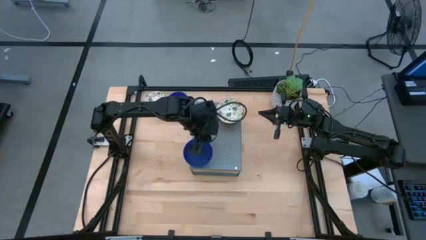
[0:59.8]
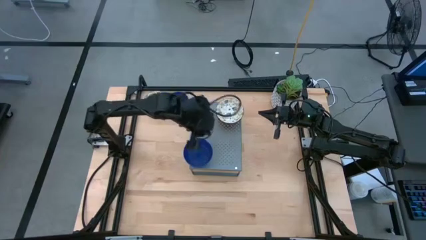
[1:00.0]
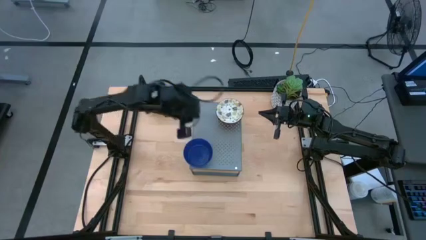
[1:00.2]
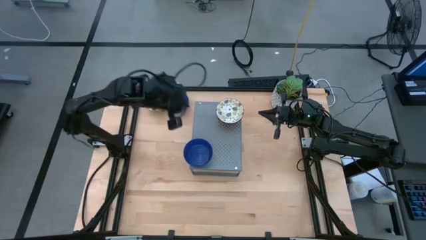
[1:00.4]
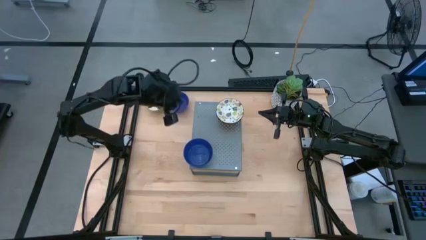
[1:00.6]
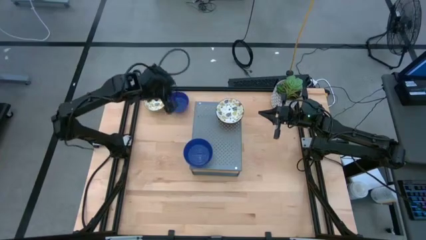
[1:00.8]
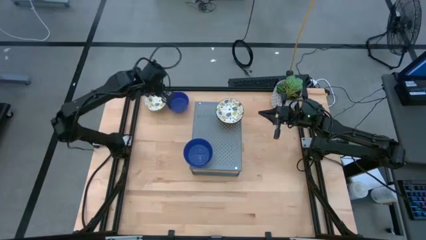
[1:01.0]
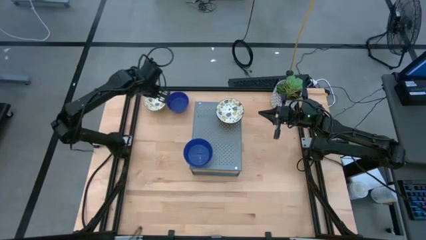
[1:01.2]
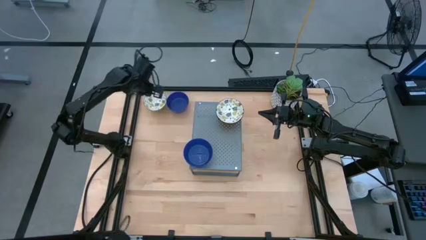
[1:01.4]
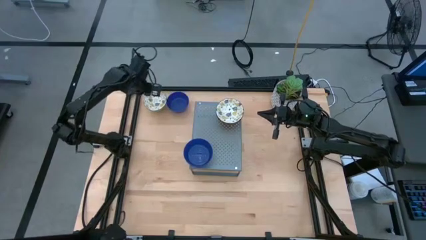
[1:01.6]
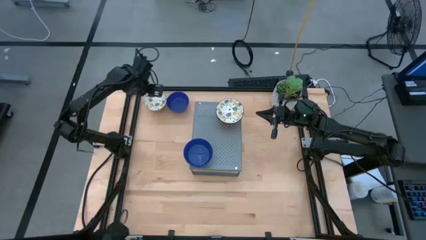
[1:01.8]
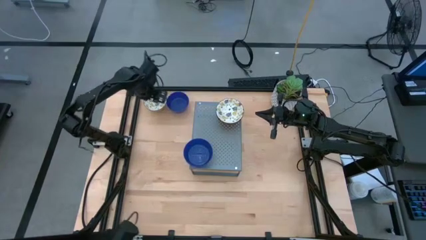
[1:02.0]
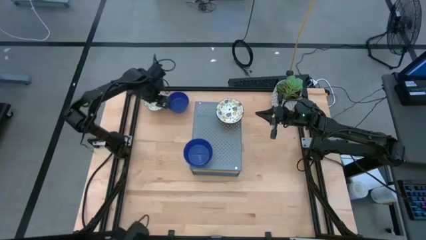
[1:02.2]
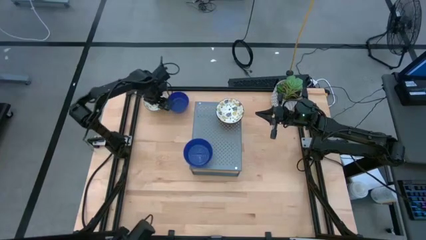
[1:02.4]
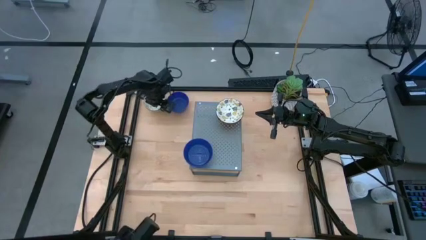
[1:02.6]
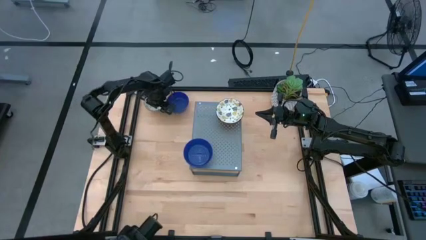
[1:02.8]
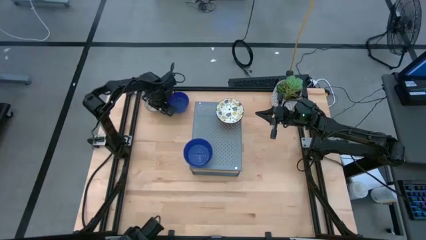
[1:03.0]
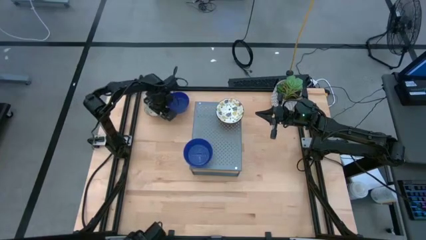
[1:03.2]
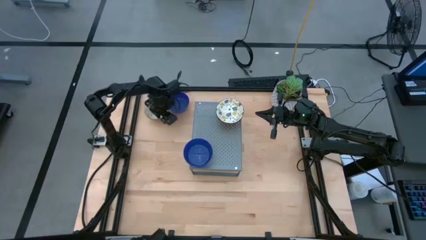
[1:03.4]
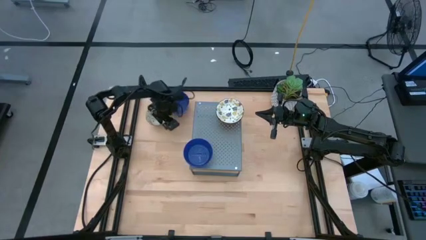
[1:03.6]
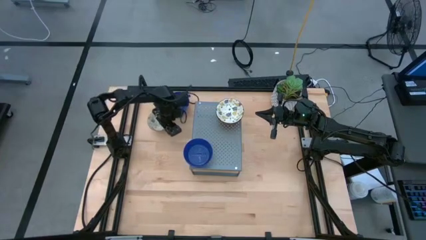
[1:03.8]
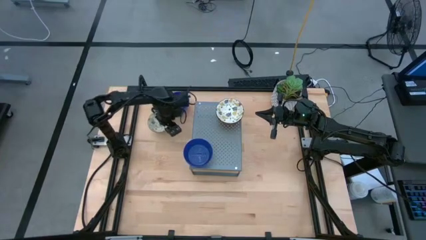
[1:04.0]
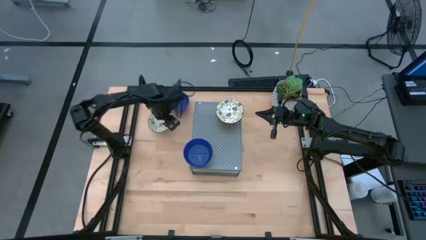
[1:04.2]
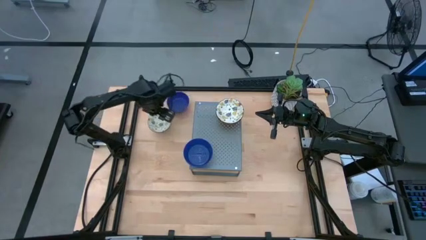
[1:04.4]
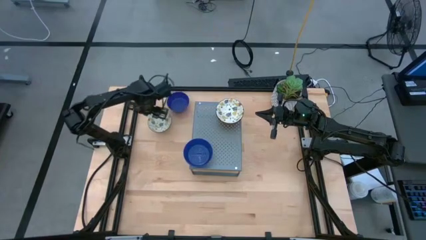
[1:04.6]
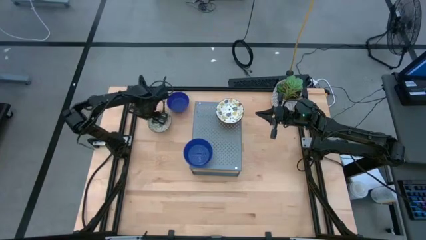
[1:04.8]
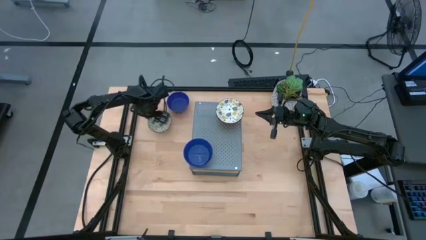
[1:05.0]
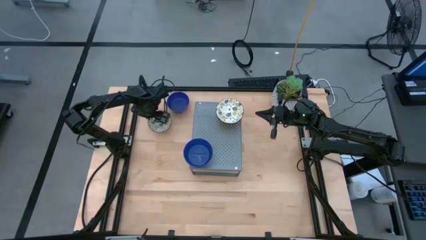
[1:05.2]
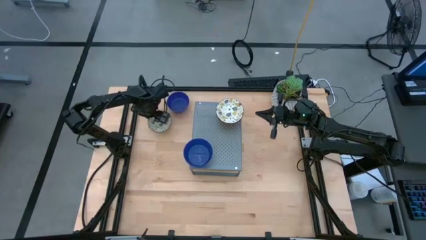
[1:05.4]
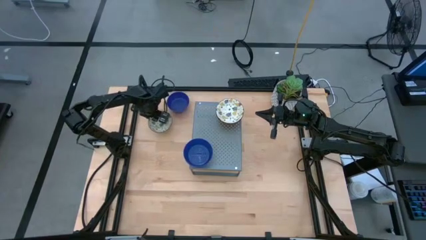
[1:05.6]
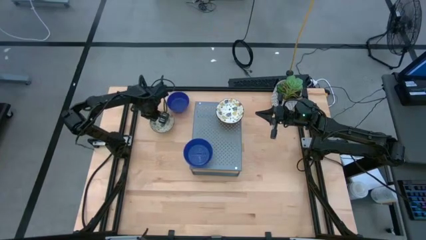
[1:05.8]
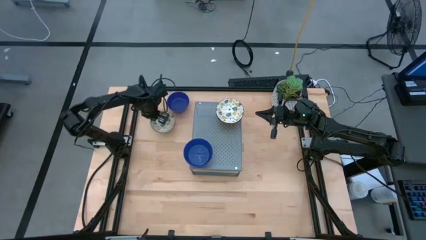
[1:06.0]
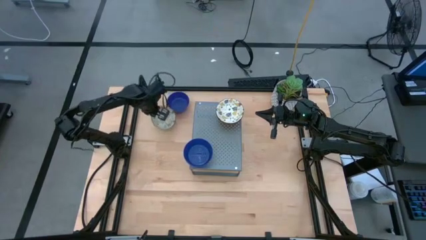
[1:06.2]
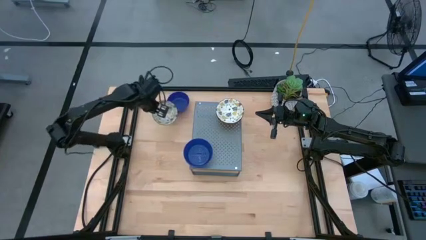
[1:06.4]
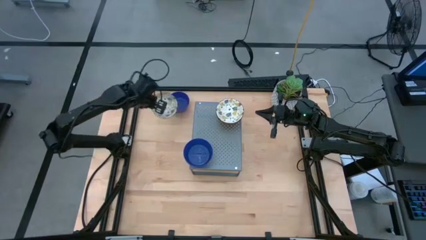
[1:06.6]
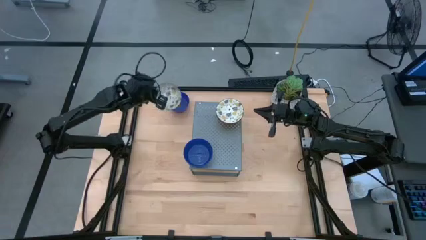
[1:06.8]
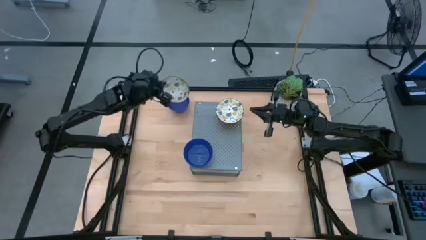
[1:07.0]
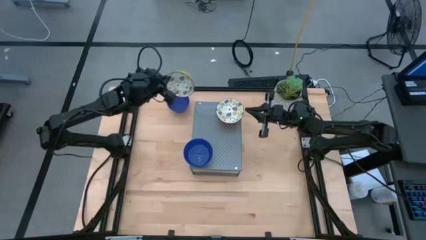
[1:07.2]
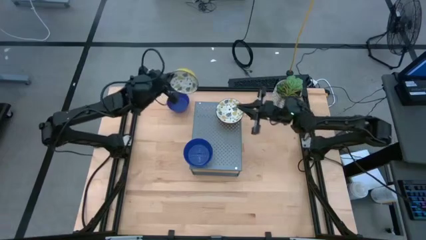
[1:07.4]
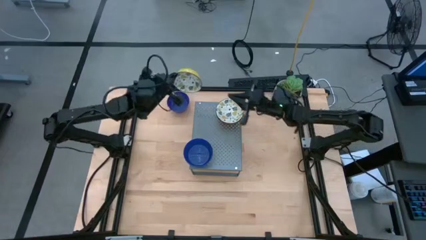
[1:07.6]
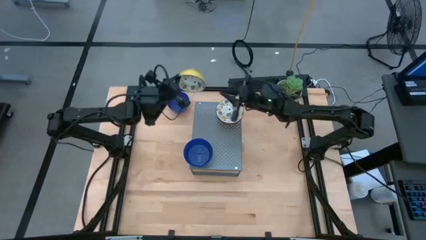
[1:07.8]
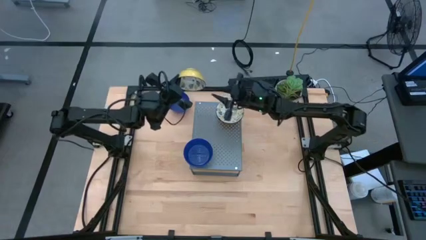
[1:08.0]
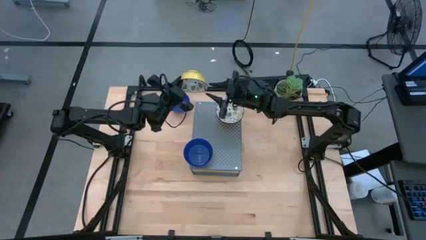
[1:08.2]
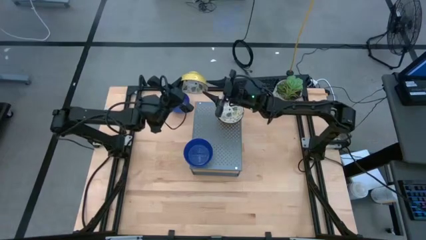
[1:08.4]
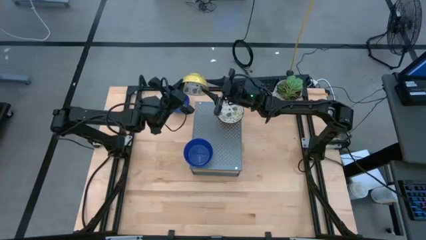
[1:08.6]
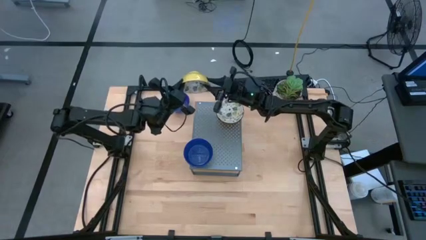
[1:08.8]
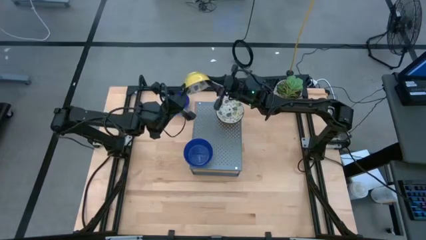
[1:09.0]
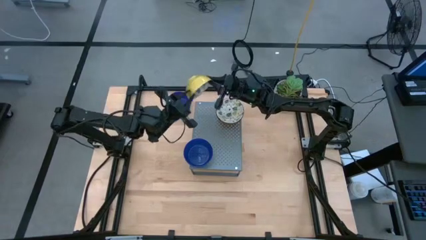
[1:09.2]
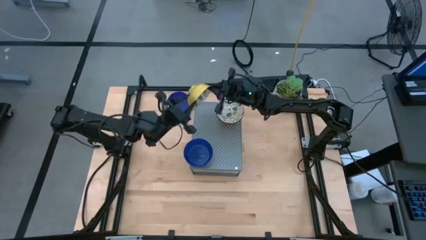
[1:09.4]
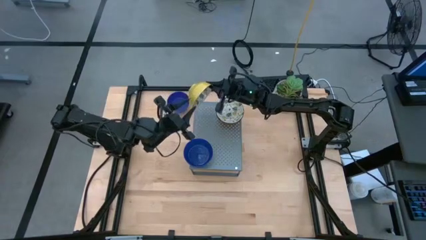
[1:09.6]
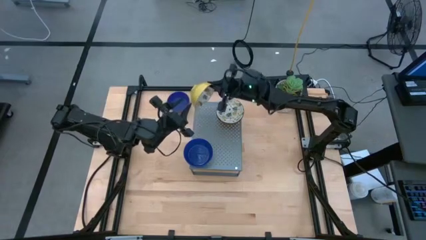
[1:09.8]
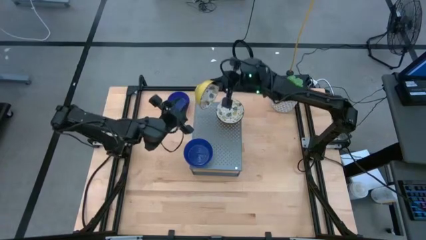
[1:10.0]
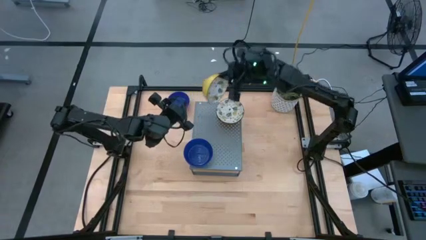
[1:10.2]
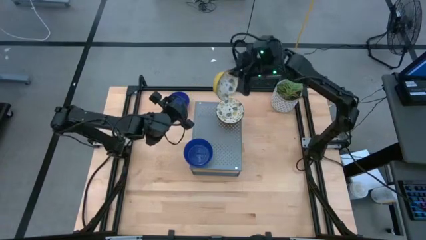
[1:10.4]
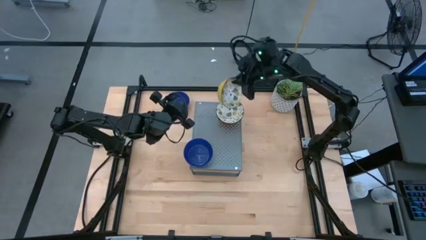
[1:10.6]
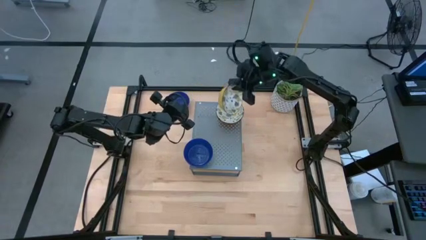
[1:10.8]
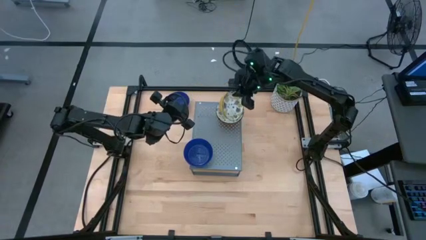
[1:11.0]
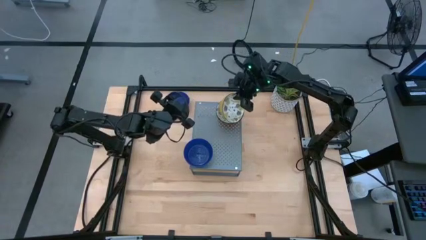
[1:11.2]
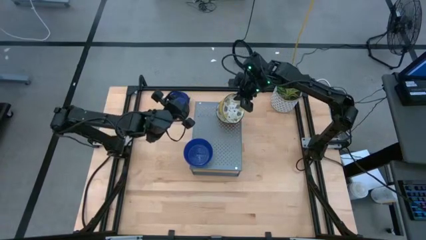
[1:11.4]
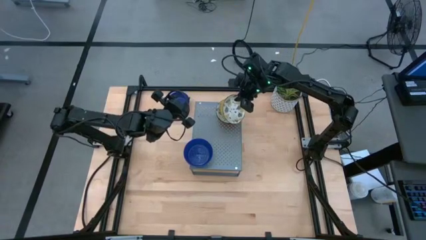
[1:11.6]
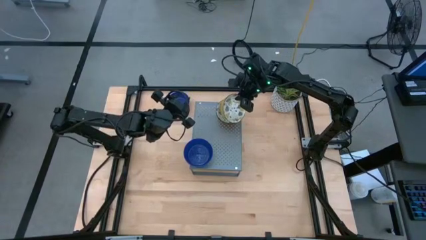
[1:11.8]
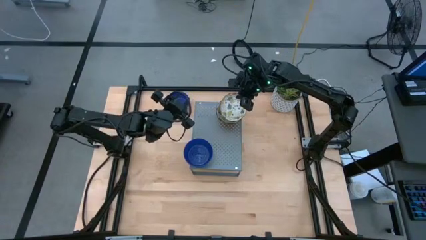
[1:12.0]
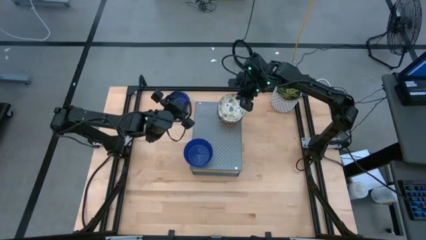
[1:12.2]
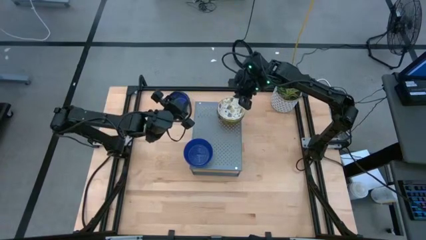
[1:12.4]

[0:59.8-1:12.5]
Task: Pick & Place Mini bowls
Stack the yellow patterned bowl on top of the yellow patterned bowl on the shelf

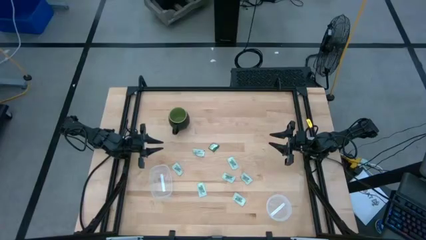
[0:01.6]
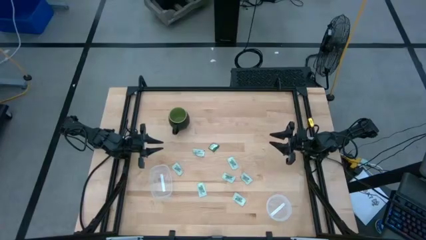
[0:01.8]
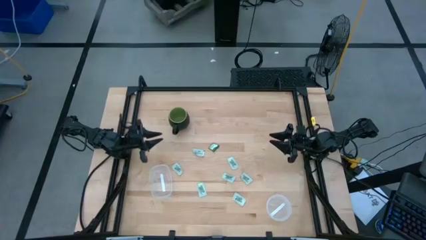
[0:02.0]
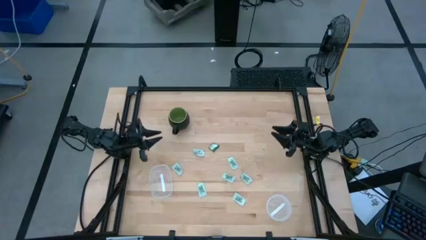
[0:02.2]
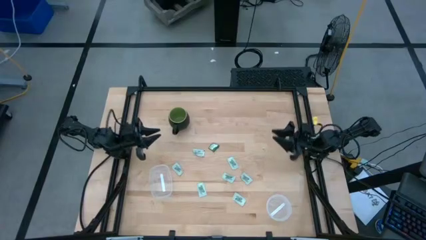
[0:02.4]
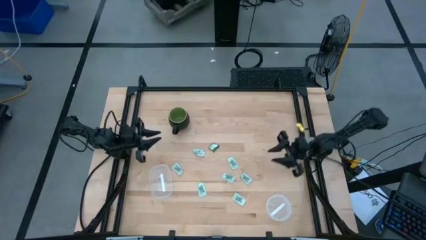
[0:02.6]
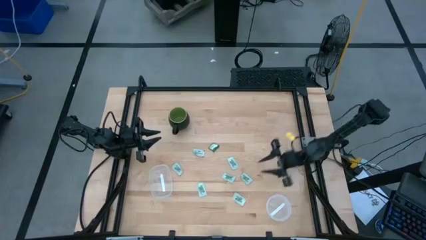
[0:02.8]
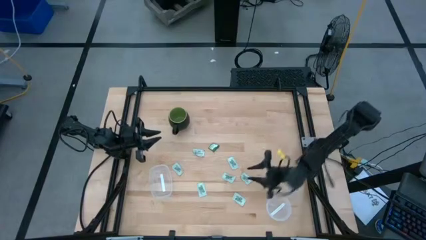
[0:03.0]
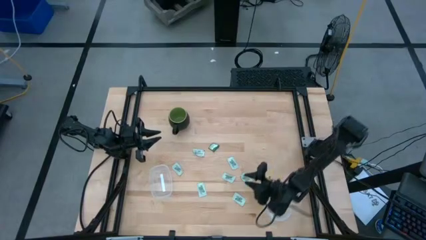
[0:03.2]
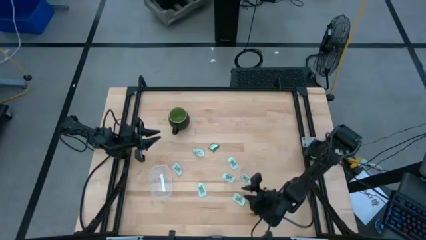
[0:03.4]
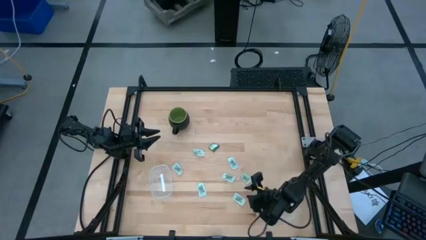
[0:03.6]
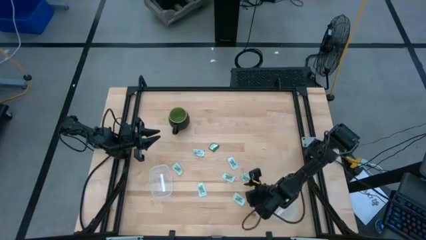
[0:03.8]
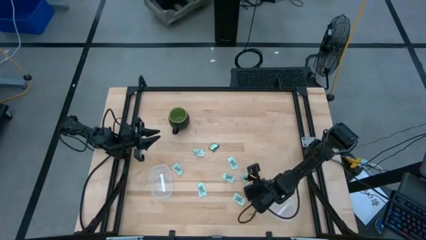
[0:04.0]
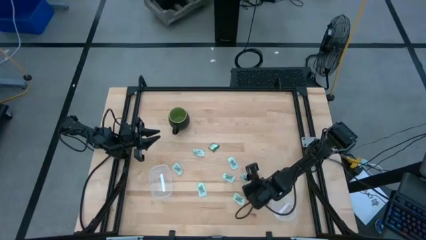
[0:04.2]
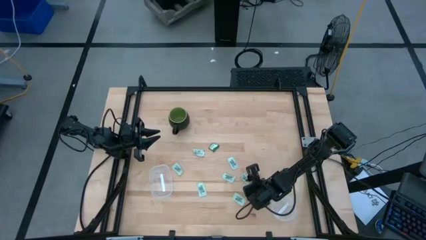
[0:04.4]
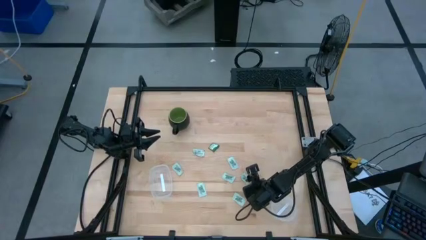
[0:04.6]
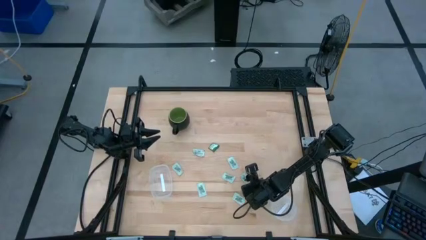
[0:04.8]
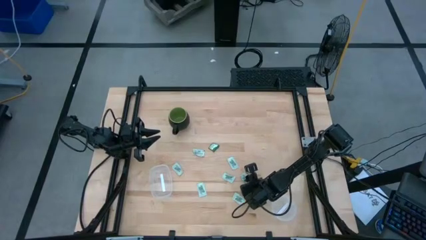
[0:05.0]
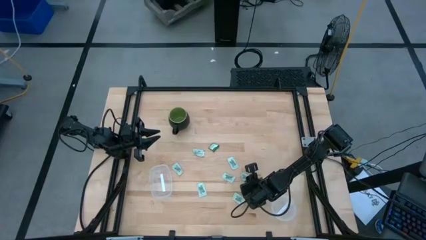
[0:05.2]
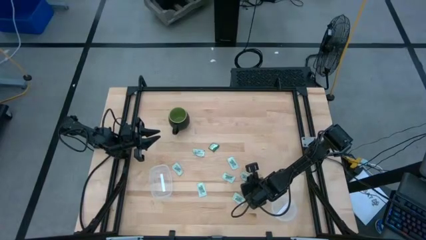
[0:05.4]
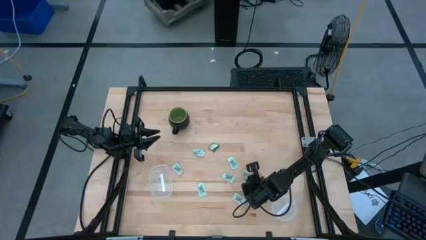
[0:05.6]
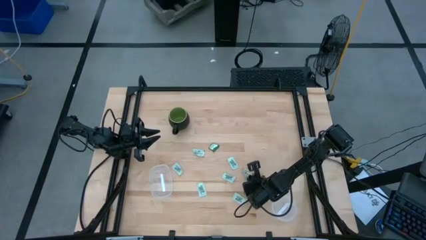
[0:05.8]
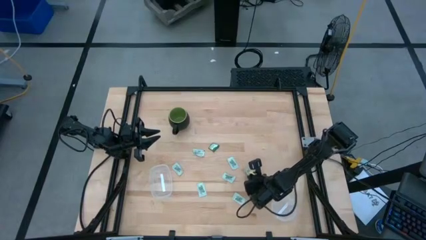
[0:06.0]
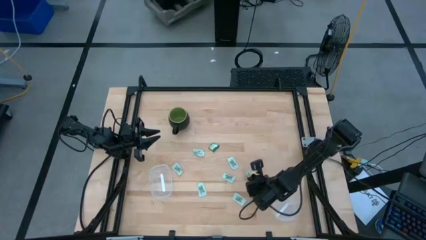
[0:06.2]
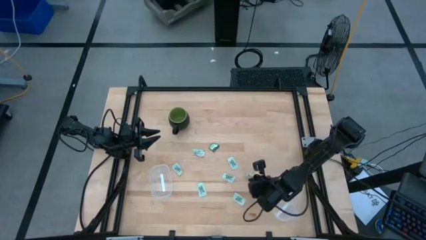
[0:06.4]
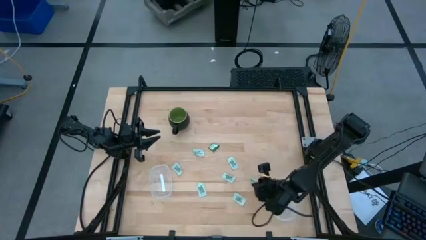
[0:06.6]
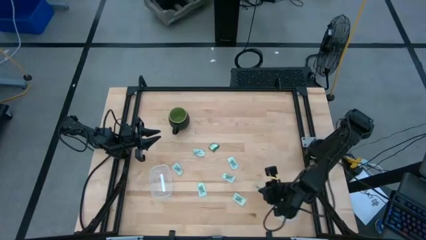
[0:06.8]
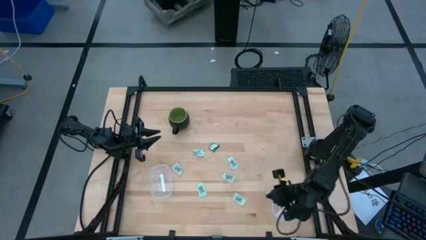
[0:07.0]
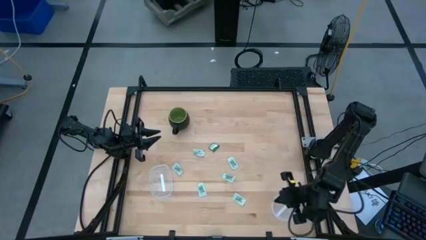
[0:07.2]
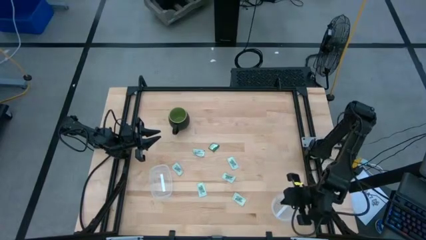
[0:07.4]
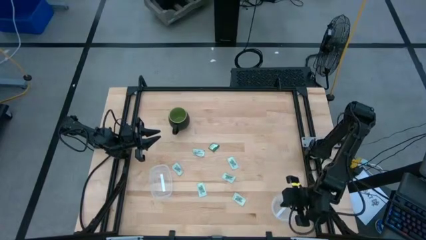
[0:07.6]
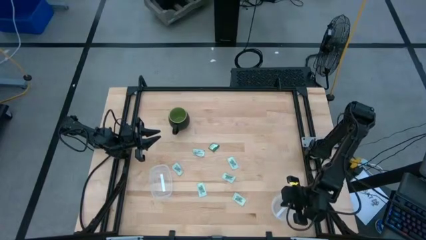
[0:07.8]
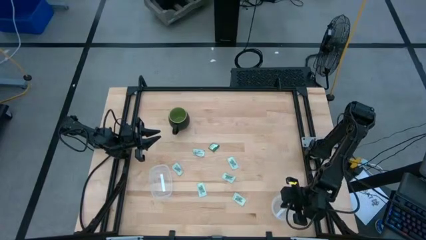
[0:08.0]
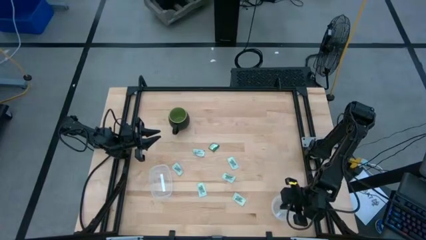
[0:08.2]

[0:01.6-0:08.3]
Task: Pick and place Stevia / Truvia into bins
Put the Stevia packet into the bottom right transparent container
